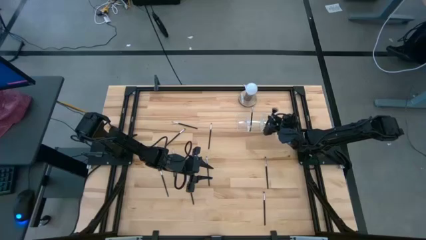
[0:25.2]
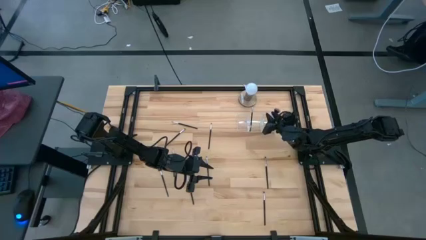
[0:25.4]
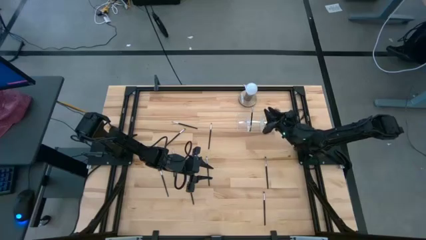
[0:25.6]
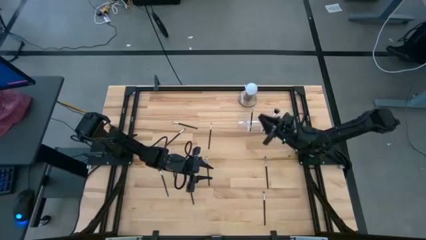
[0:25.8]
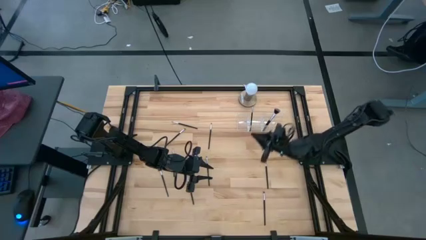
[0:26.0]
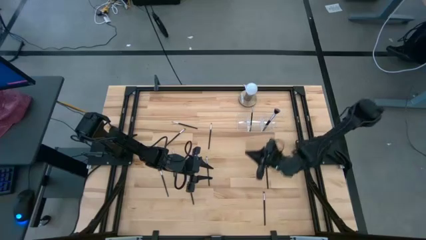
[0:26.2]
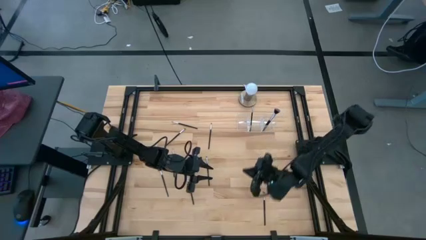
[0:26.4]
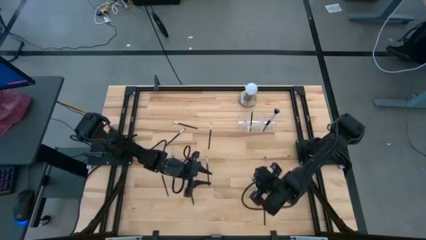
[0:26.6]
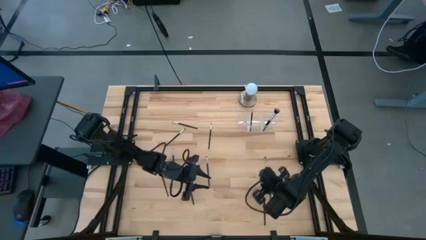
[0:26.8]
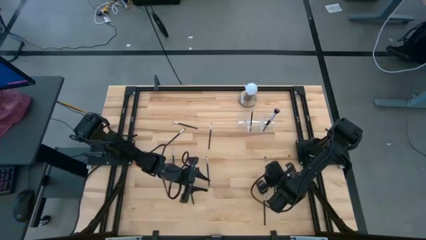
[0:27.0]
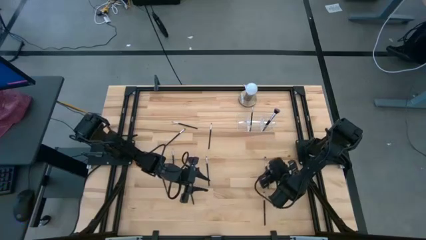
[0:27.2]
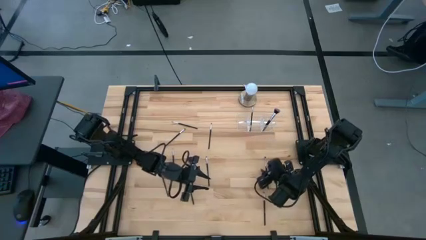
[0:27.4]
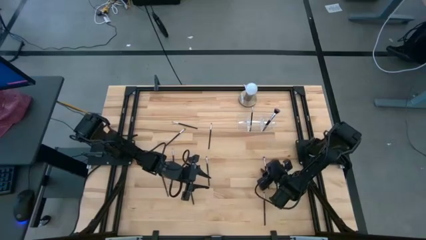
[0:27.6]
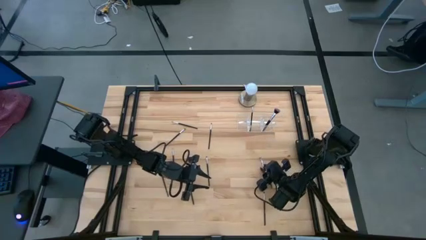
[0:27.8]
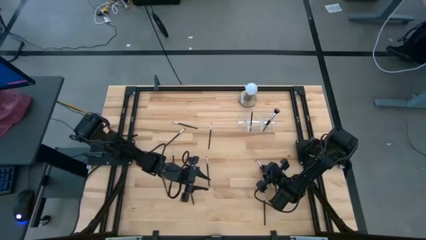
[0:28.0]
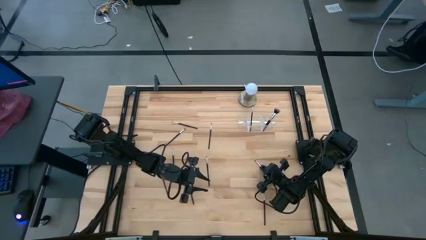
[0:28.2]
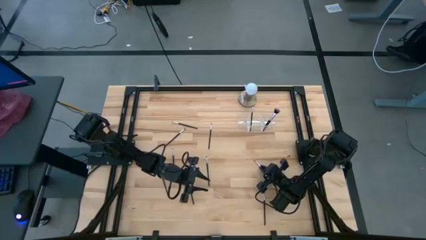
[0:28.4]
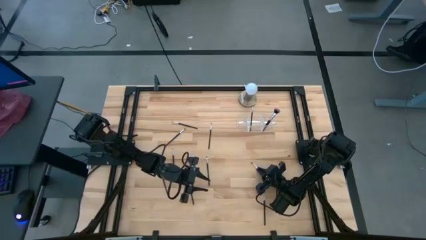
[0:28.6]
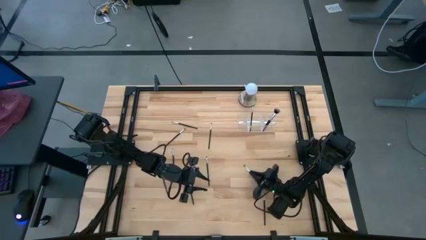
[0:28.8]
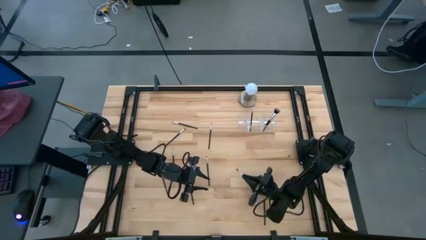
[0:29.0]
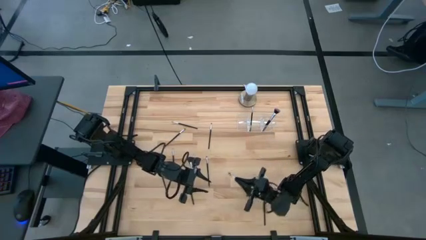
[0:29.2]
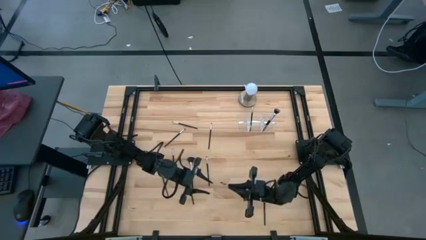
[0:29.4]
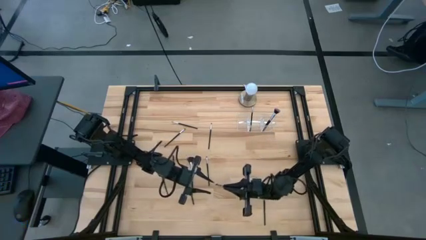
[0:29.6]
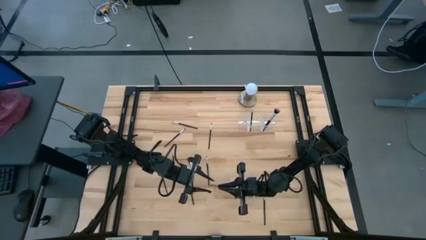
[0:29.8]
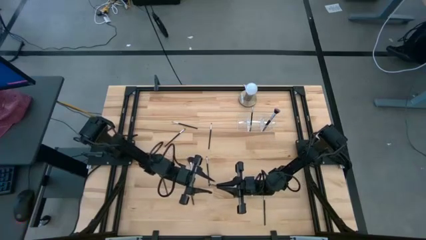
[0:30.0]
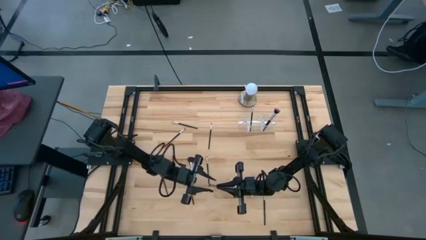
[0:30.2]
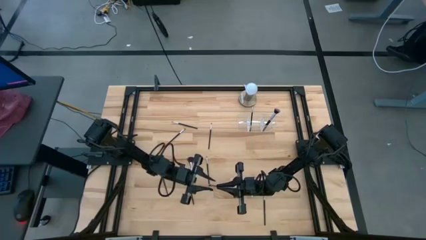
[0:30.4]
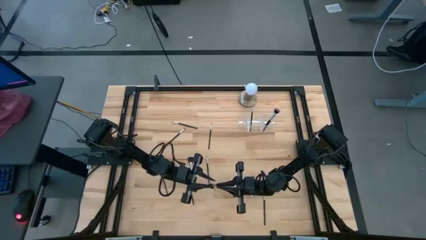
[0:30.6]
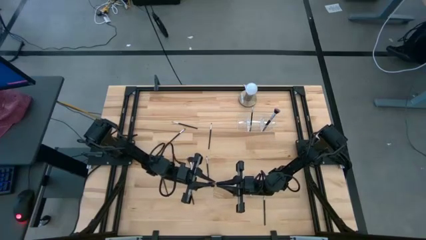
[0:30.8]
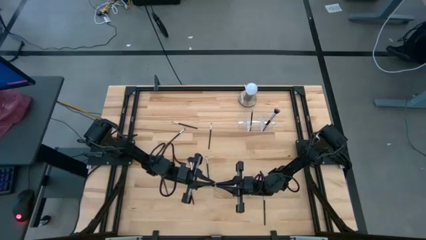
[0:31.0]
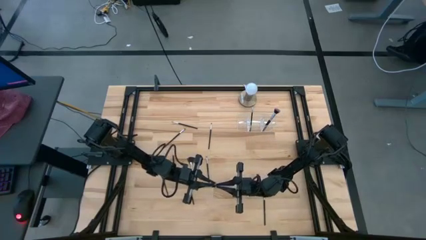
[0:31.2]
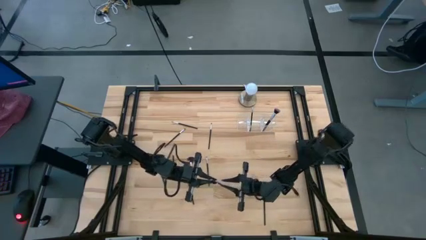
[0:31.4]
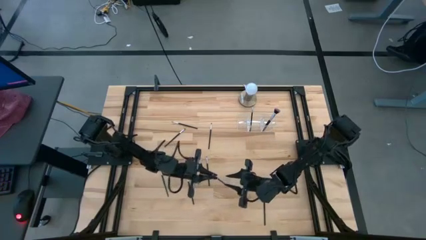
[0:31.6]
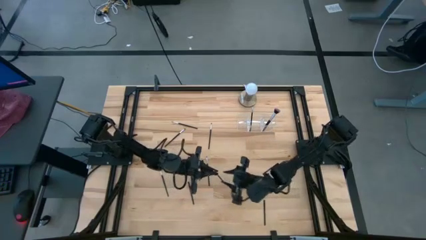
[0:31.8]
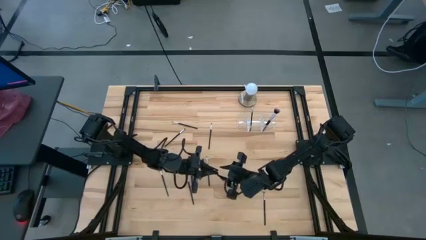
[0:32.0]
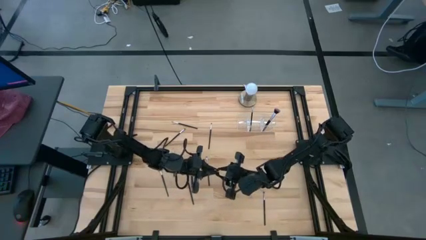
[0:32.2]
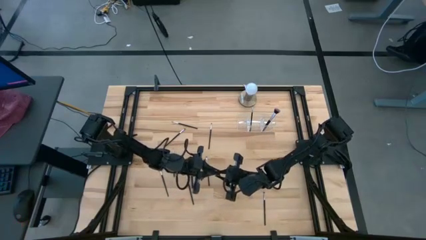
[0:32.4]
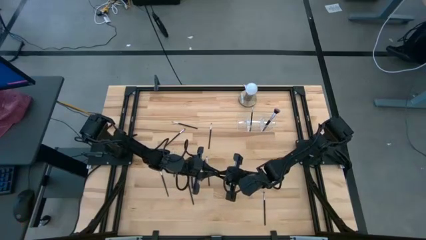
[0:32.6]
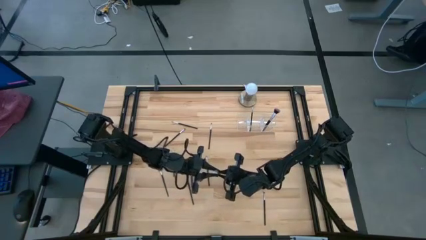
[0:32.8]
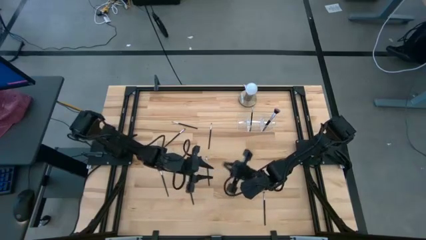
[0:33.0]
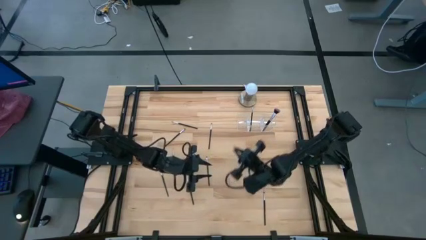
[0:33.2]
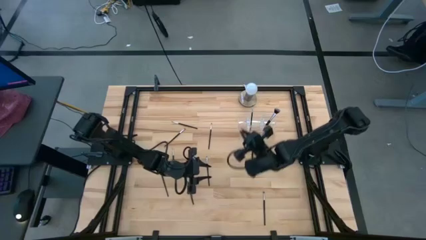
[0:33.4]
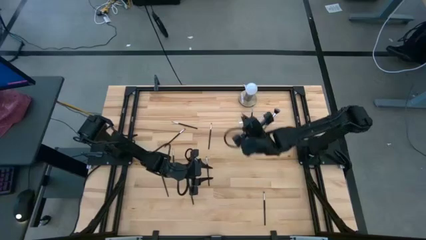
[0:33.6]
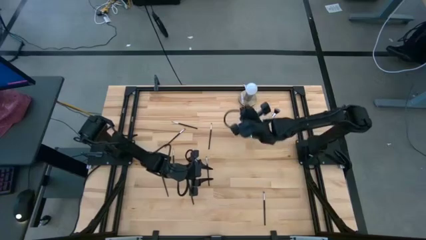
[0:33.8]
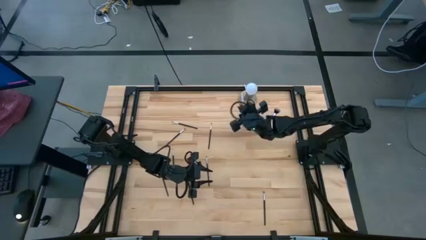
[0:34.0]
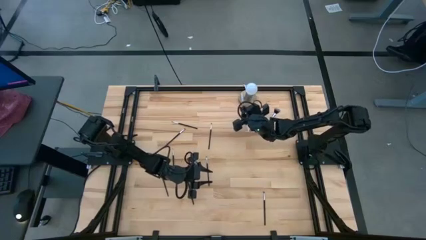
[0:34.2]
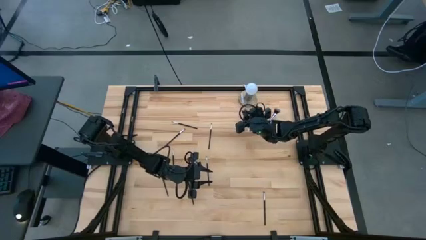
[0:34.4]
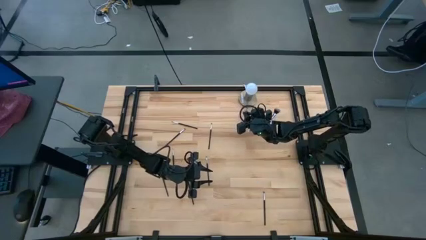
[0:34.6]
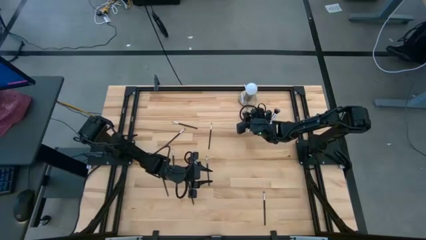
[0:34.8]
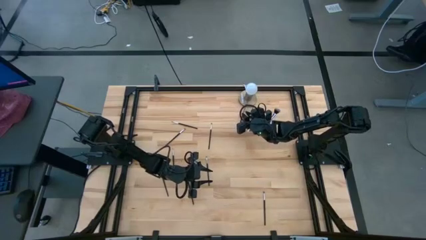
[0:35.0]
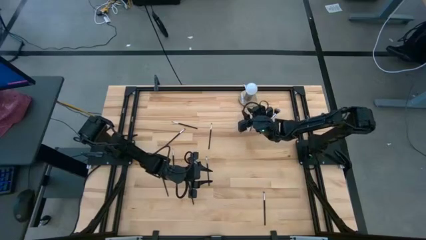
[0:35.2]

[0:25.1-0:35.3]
Task: Put items in baskets/containers
Put the eyeshadow brush into the transparent organizer

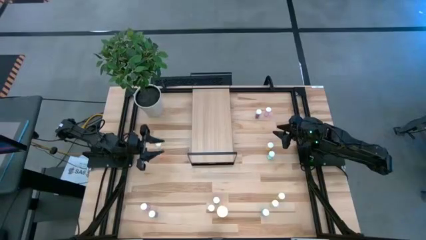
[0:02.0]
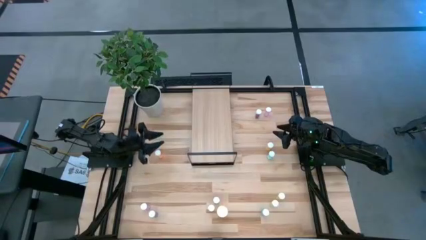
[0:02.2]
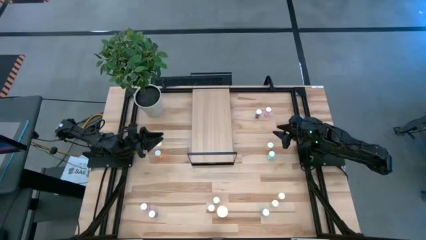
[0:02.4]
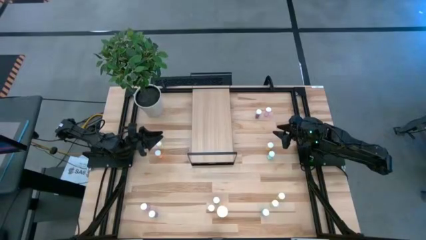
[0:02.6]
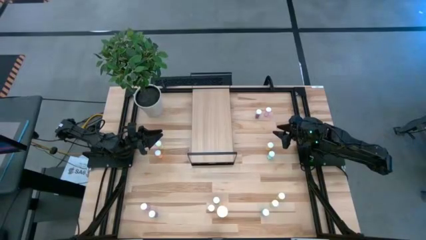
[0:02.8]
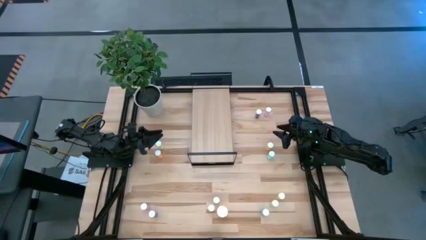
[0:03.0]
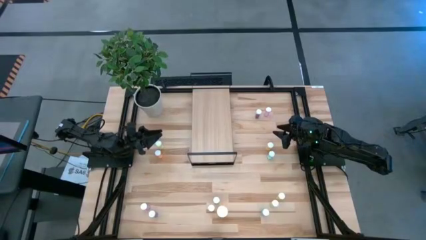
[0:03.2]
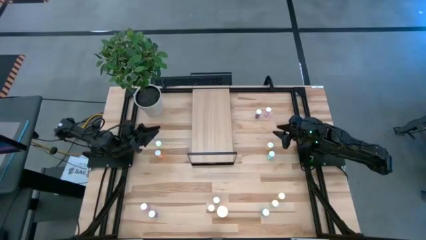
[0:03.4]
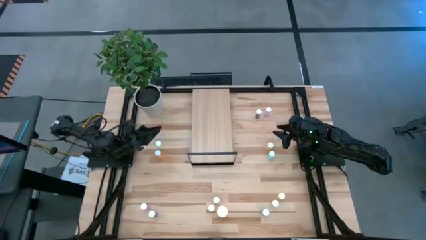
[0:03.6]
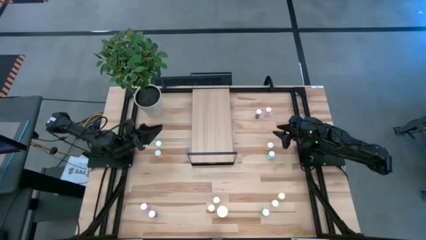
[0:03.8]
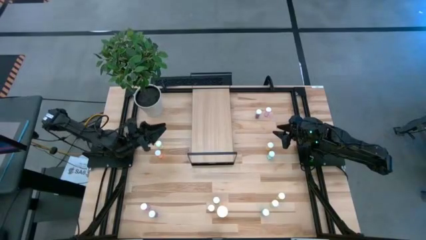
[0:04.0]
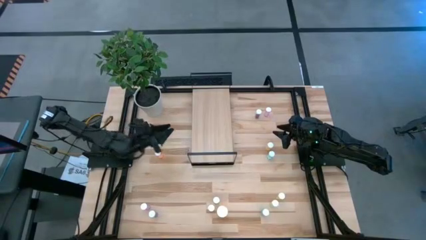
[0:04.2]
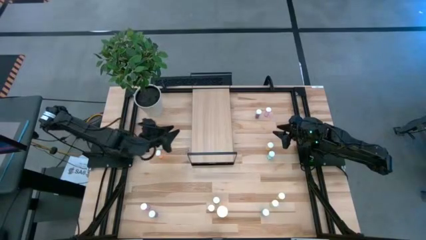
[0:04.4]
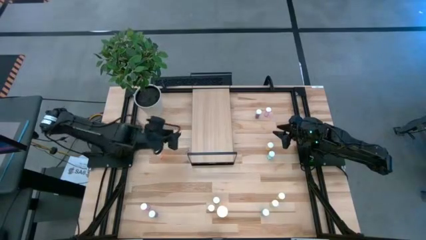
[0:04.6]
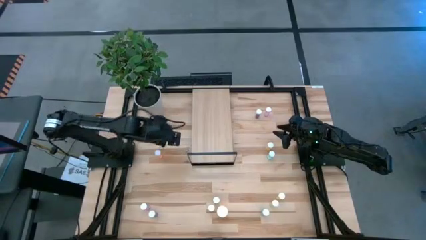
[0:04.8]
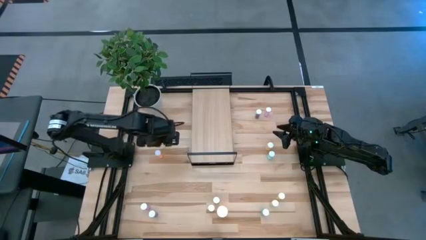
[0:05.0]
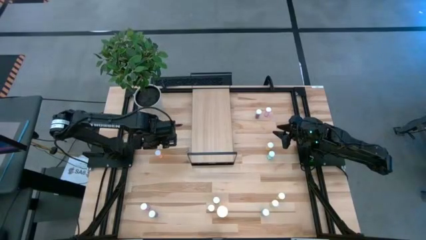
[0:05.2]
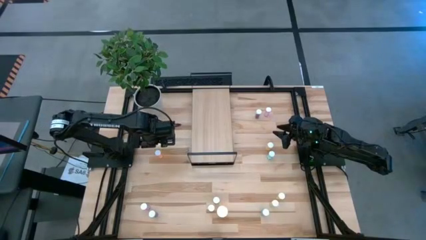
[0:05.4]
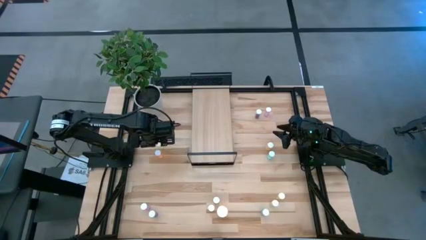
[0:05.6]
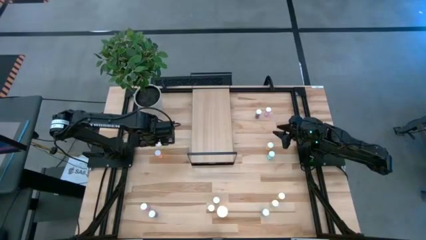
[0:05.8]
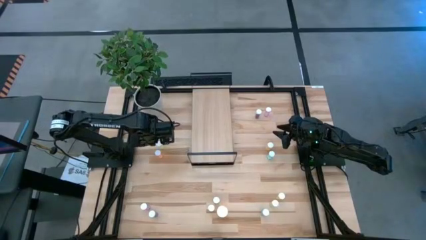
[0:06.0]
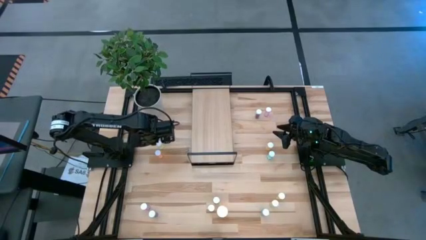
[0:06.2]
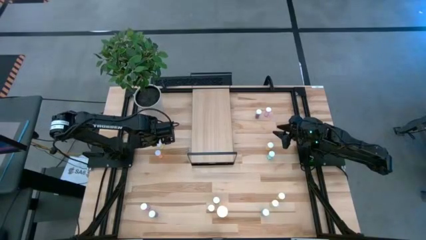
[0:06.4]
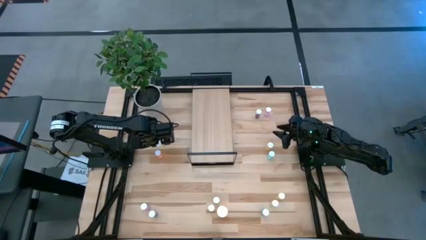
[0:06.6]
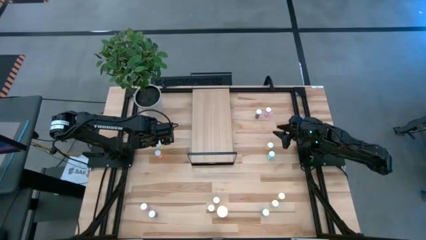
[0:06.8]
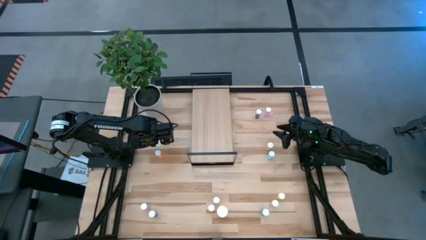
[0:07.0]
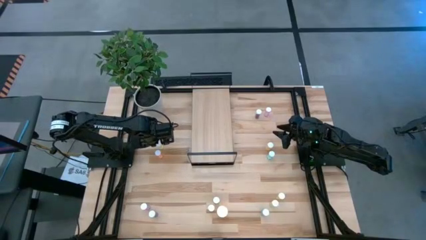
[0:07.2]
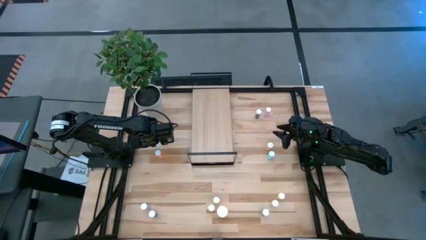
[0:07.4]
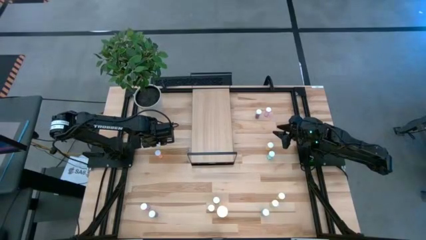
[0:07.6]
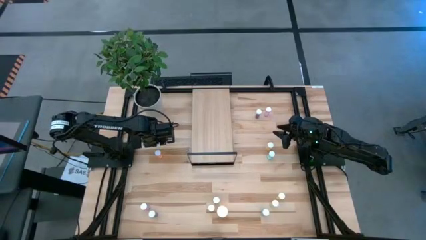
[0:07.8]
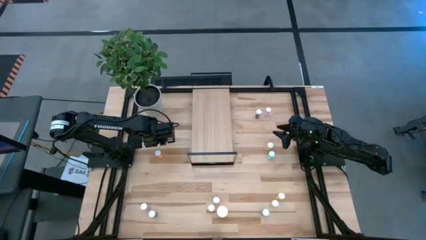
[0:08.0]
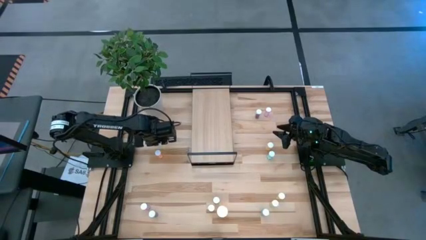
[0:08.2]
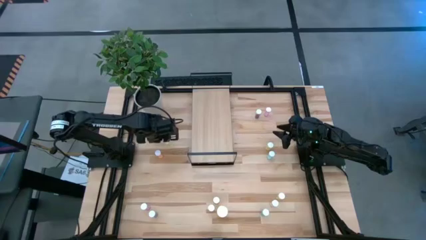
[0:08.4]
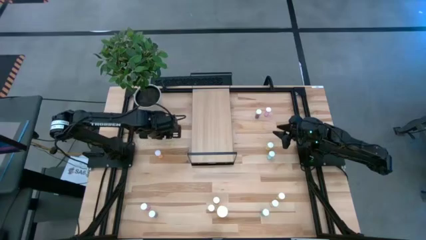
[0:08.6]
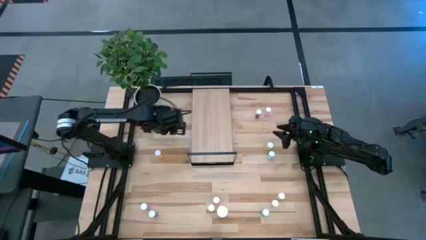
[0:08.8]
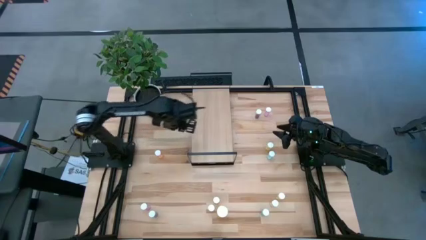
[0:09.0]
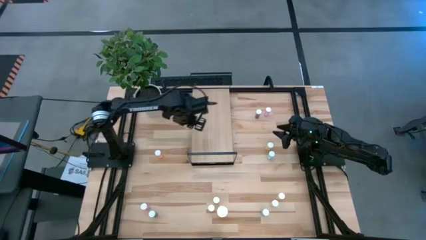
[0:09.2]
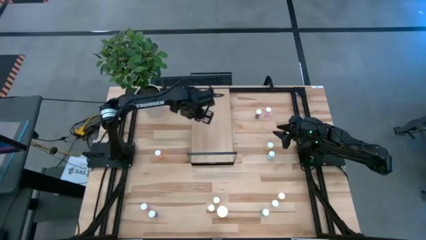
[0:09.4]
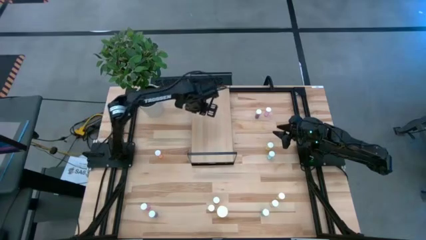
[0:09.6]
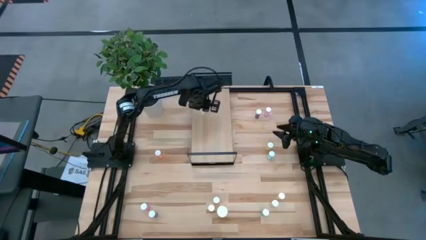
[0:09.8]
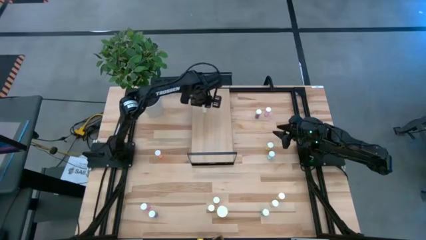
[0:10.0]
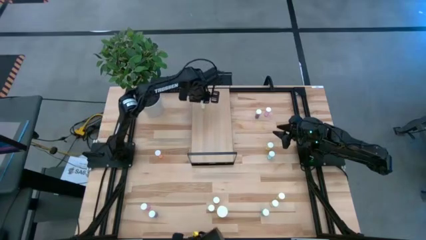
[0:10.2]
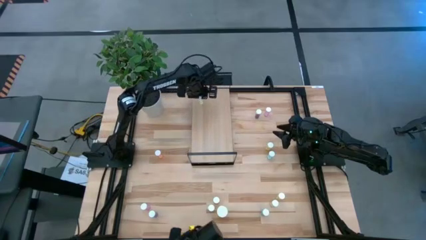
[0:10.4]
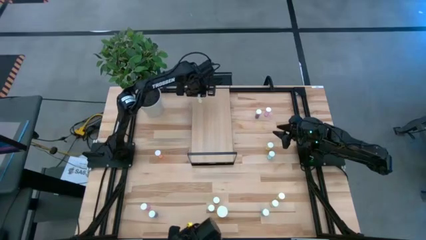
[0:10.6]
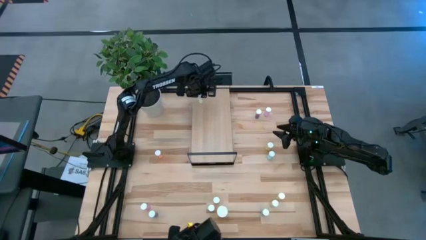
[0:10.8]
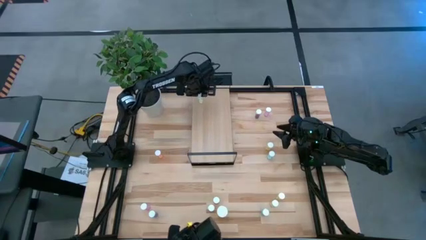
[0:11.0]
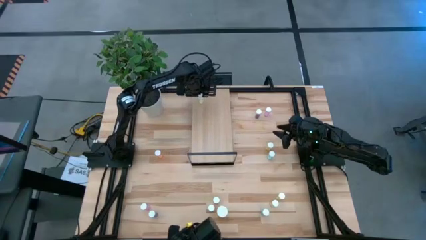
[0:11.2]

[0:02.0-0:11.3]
Task: Pick and place medicine bottles onto shelf by color
Put the yellow pill bottle on the shelf
